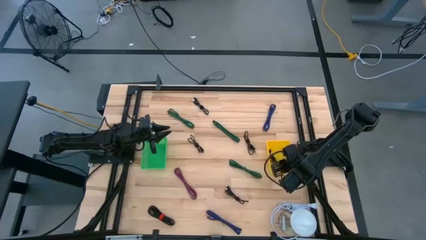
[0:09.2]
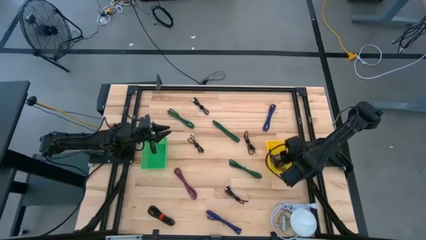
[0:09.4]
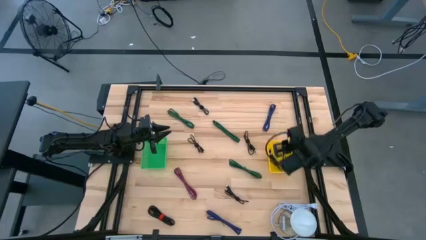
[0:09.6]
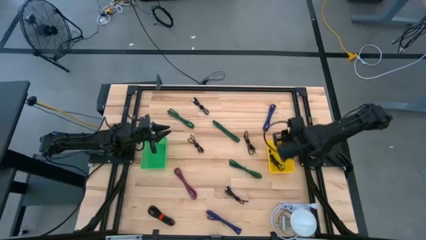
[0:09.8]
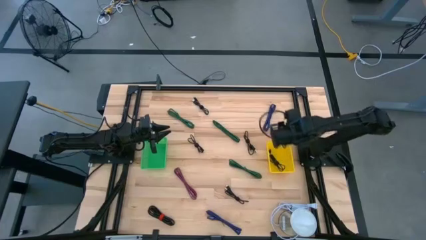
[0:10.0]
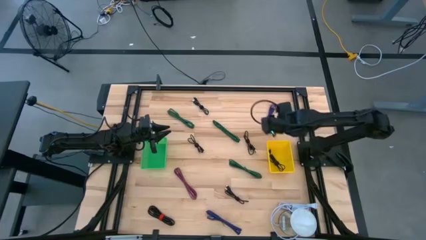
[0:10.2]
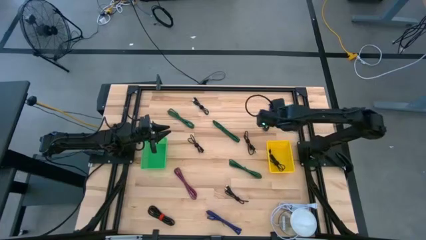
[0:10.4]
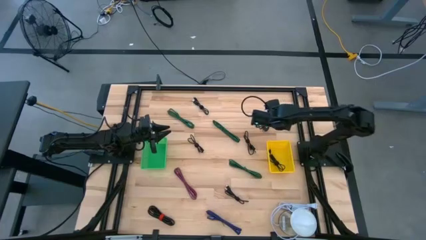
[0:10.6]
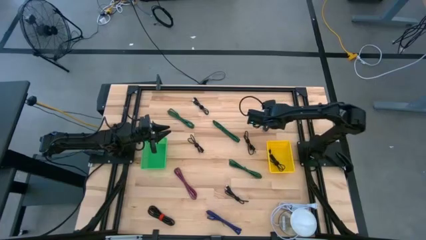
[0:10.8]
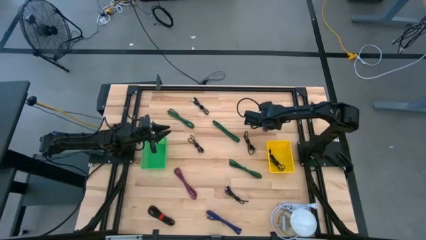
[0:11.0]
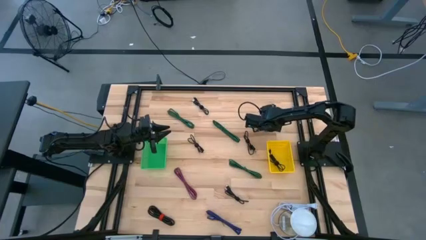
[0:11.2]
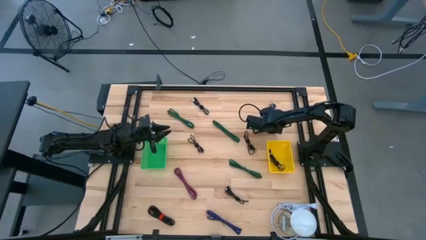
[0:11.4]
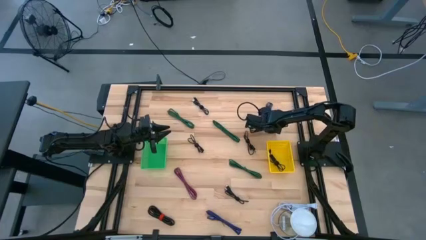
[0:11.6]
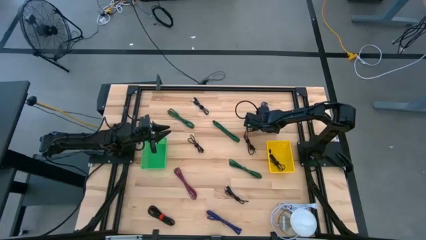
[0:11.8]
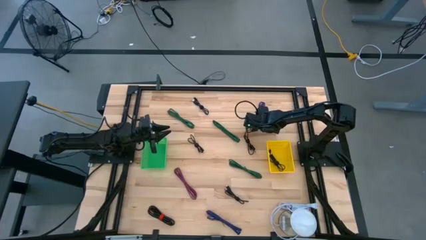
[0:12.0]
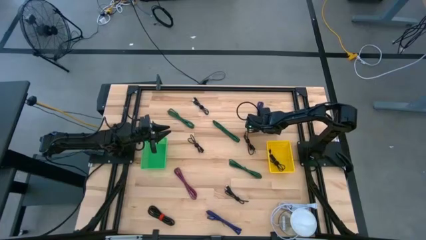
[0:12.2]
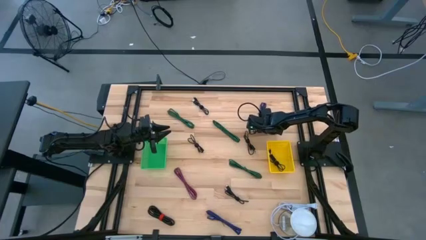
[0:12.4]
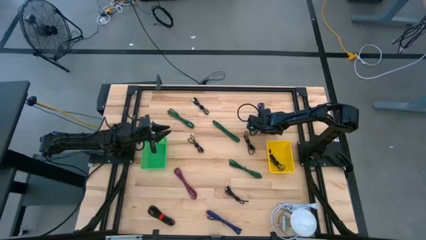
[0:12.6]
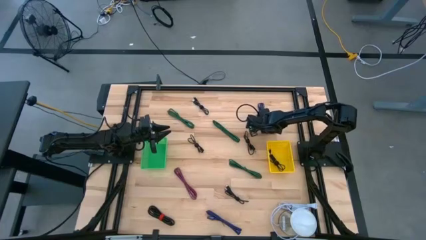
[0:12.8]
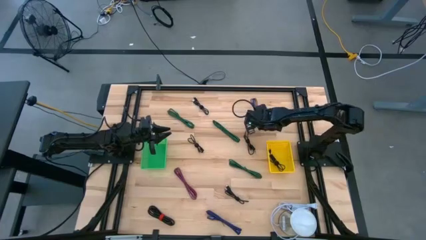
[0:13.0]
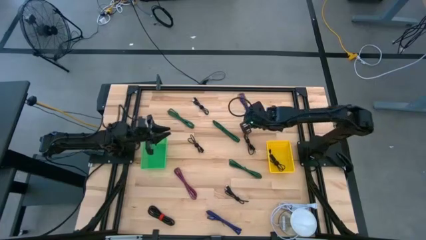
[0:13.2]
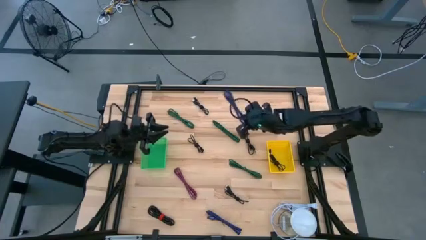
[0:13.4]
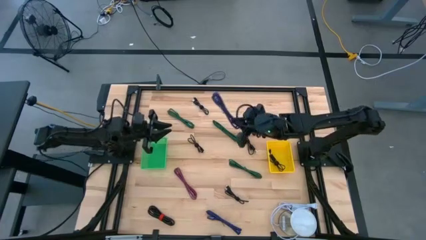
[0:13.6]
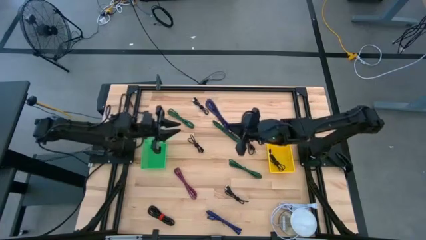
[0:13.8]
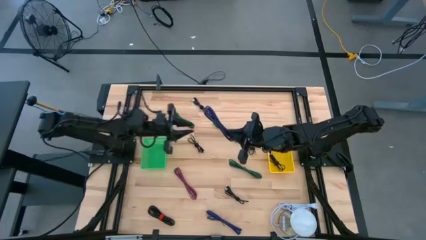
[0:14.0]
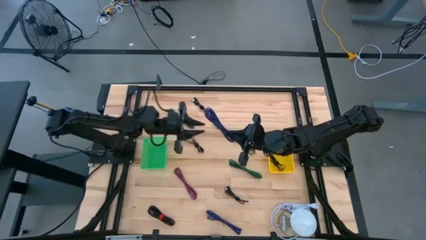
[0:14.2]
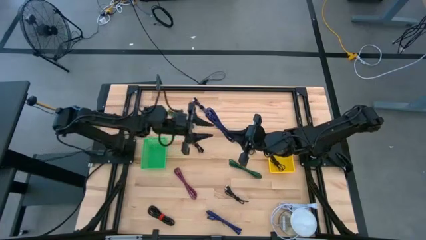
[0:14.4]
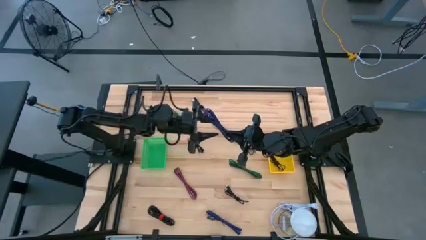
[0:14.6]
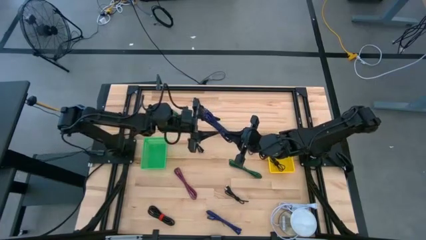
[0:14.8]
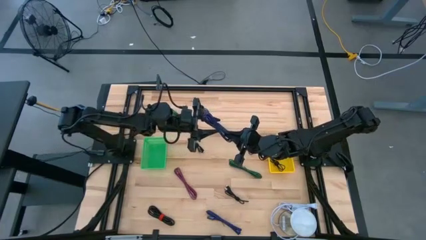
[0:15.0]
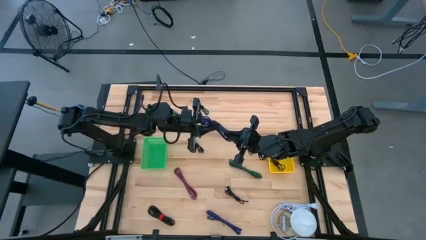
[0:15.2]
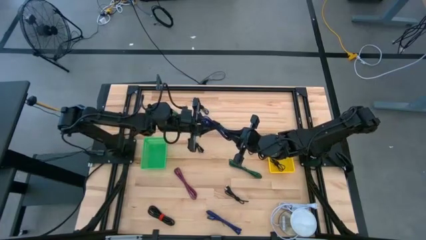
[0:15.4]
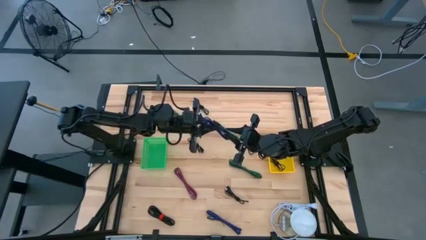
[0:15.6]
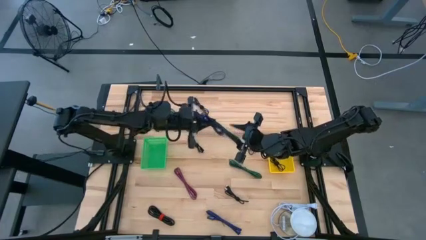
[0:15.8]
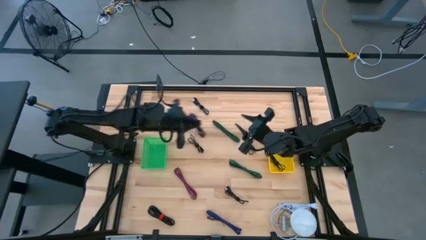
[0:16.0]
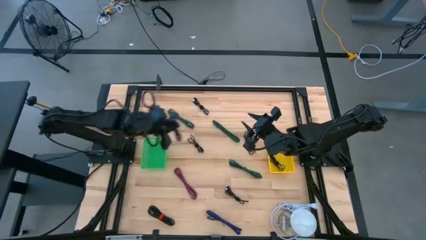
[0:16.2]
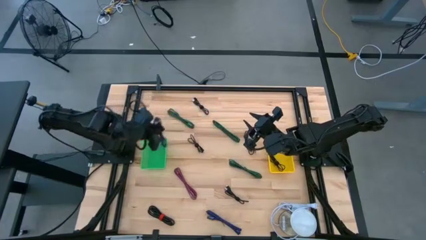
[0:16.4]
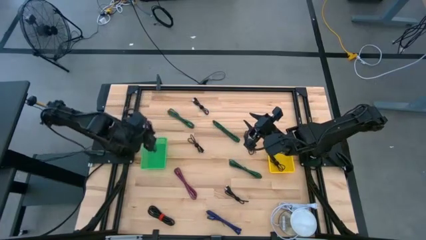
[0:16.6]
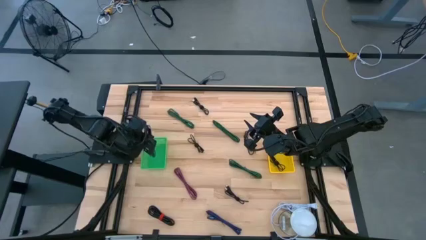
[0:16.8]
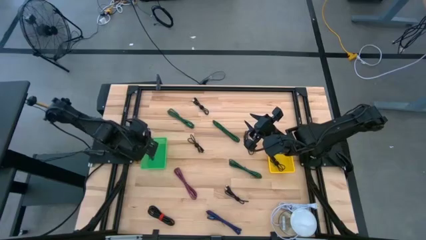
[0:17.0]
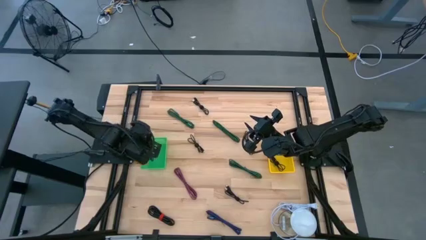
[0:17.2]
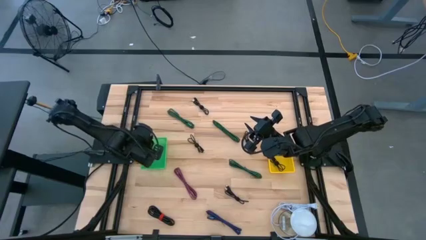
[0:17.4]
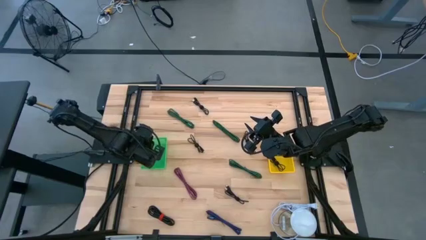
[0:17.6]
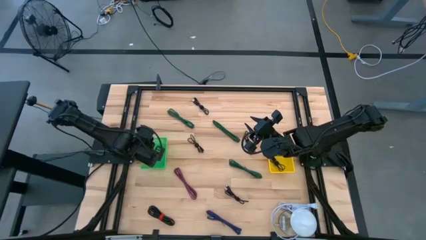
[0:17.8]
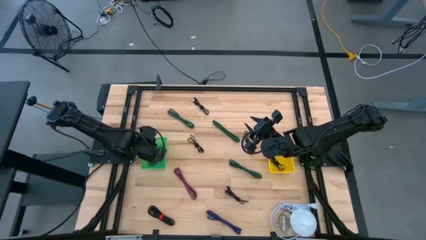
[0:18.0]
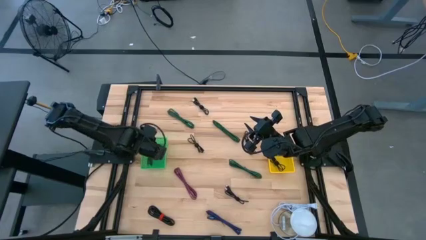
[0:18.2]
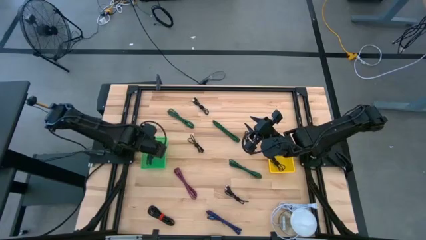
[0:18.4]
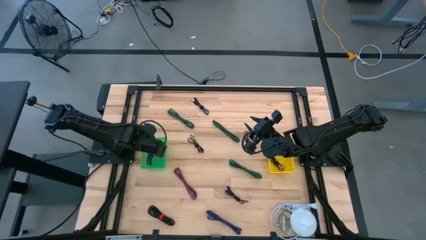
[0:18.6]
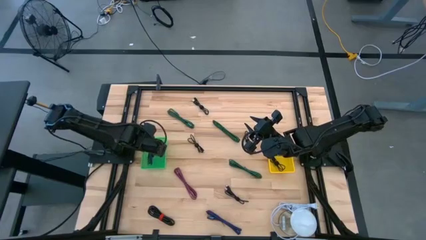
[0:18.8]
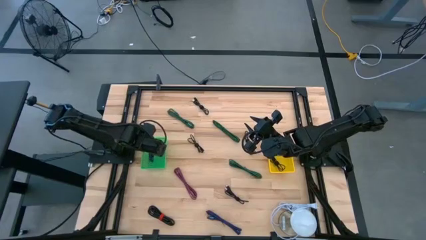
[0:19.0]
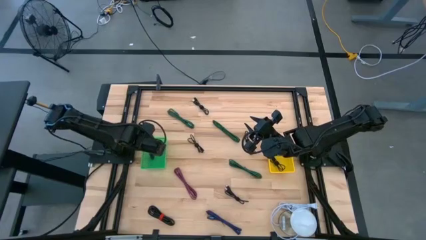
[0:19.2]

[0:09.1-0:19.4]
Task: Pick & Place USB Port
Put the purple black charger cable into the green bin

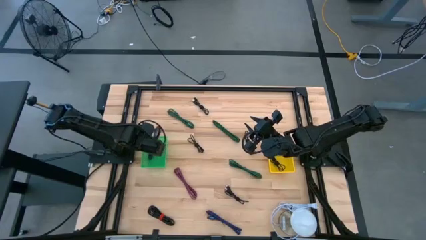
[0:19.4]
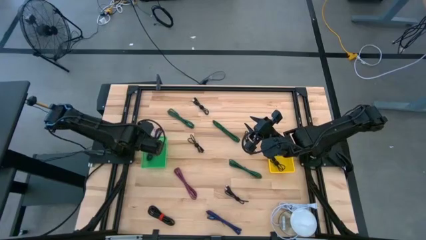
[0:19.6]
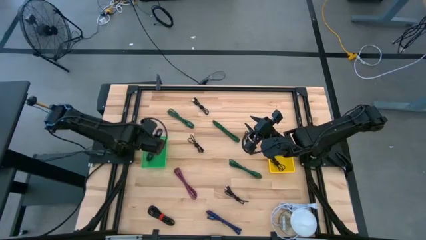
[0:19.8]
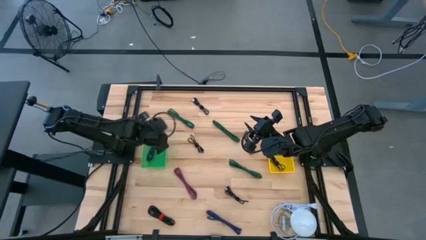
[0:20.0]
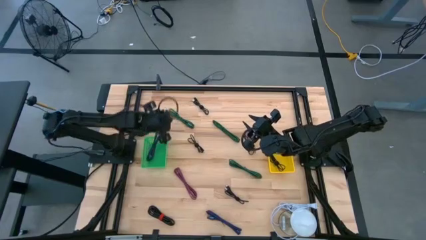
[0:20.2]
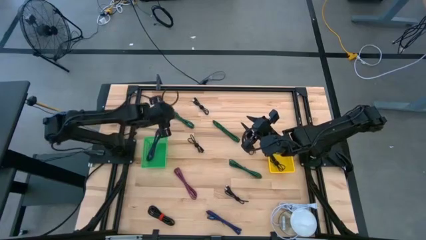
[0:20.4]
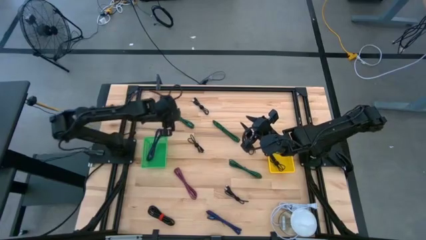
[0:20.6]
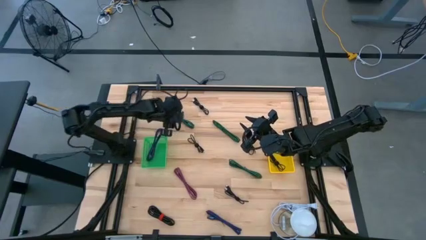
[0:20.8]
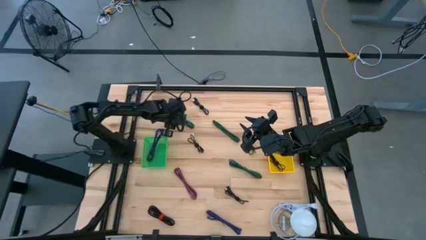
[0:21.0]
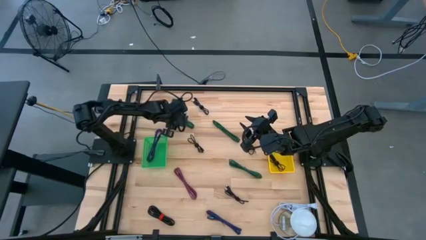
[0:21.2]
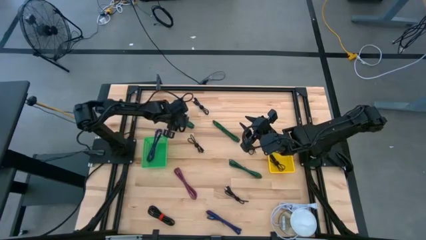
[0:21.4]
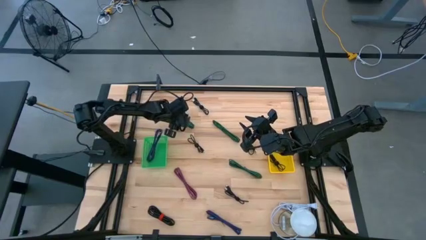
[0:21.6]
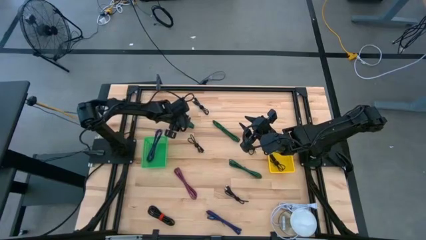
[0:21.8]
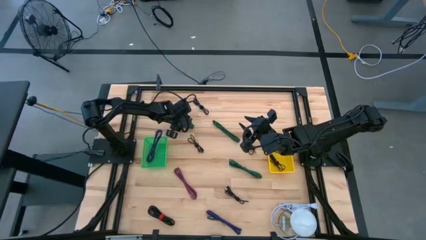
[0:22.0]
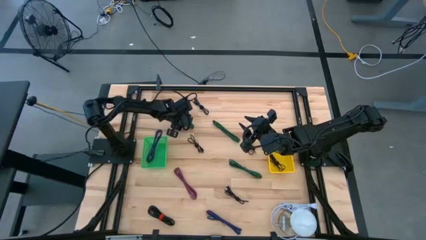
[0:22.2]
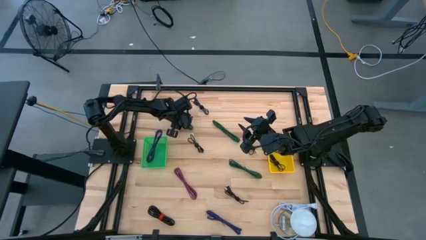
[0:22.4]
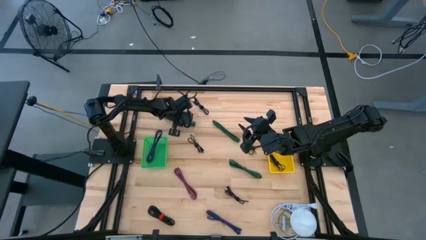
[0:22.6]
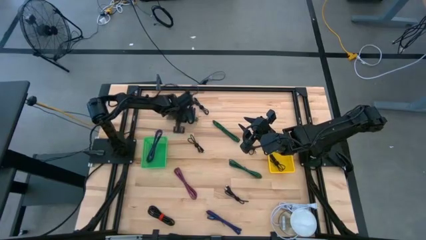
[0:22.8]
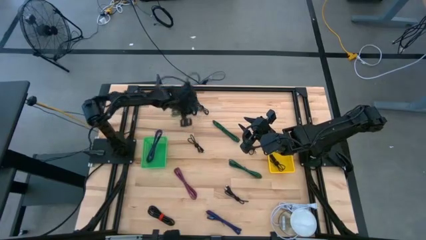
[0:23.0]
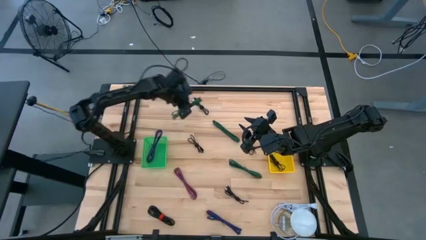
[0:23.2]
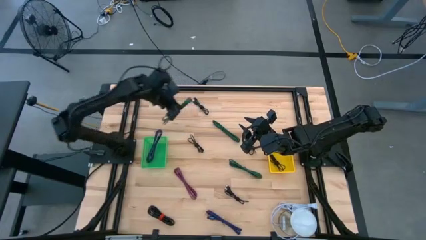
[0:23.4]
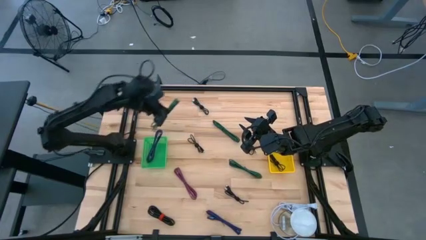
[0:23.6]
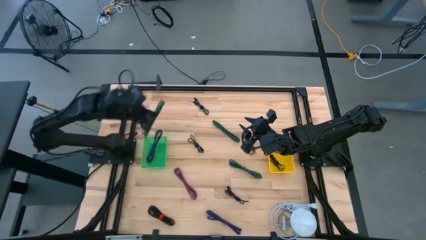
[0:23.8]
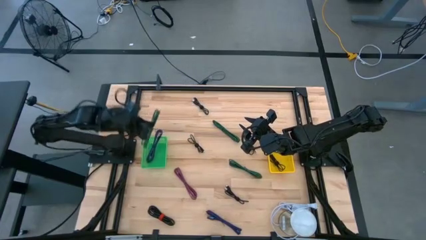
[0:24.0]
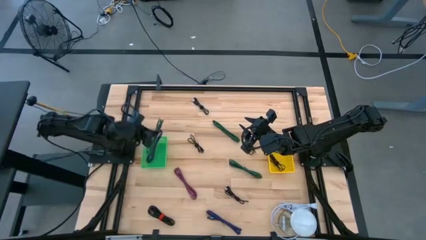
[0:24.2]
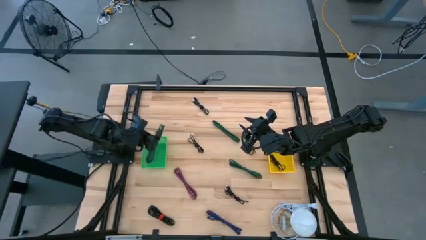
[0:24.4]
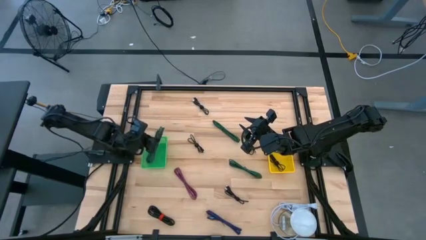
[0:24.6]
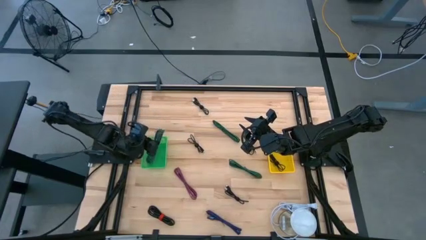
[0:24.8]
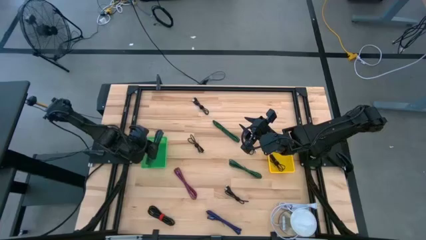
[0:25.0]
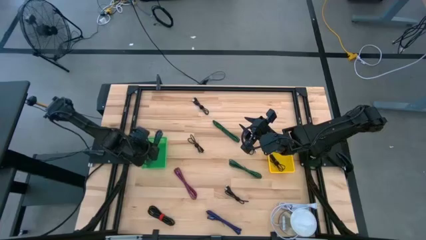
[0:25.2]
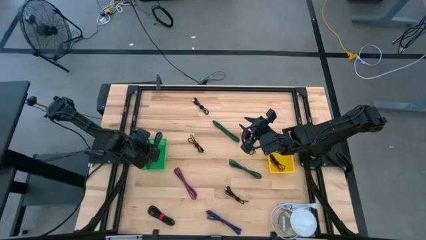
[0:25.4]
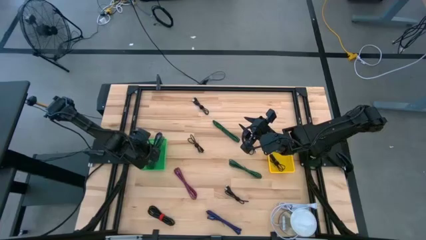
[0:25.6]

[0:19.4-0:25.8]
Put the green black charger cable into the green bin
